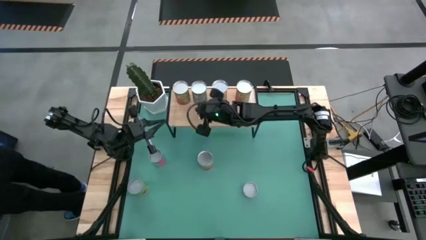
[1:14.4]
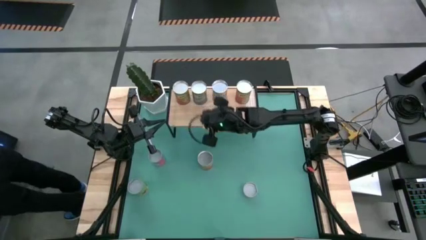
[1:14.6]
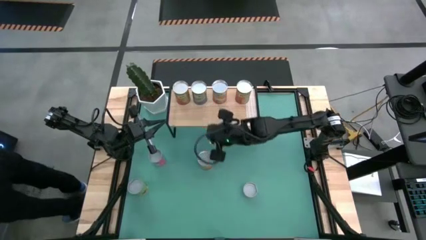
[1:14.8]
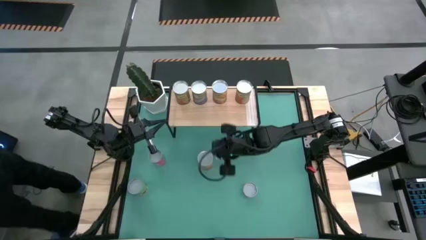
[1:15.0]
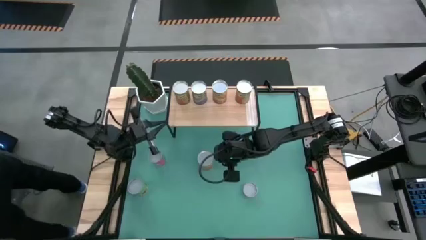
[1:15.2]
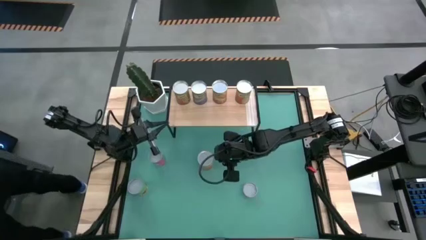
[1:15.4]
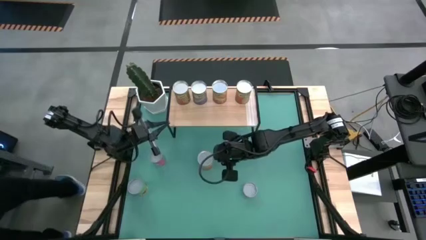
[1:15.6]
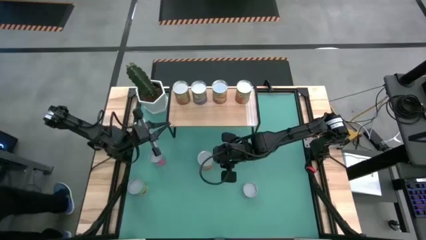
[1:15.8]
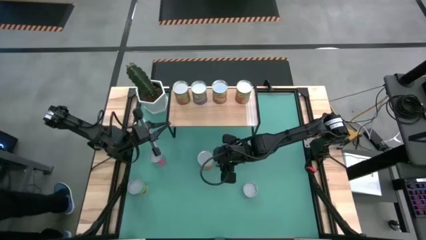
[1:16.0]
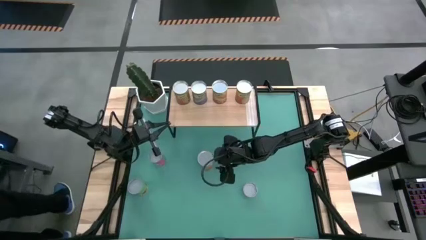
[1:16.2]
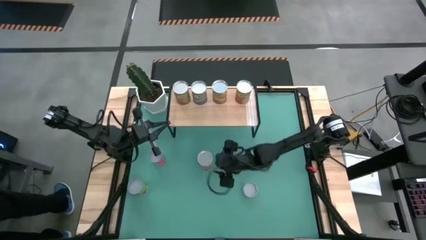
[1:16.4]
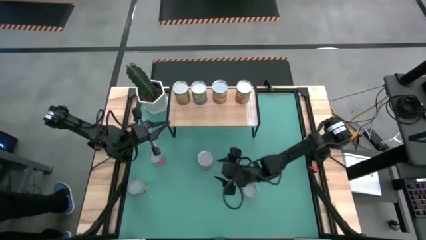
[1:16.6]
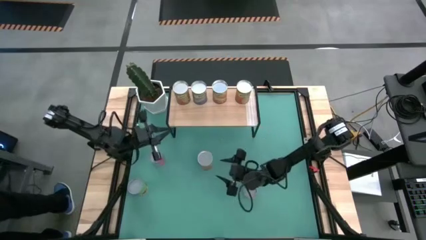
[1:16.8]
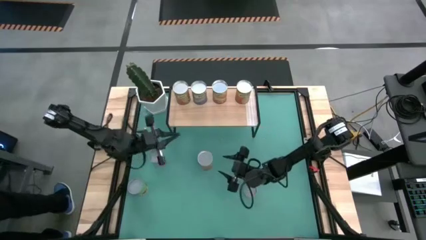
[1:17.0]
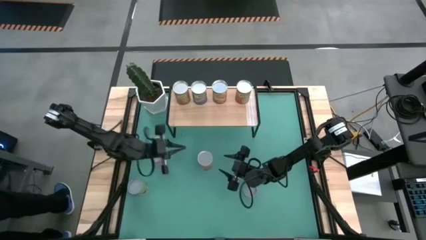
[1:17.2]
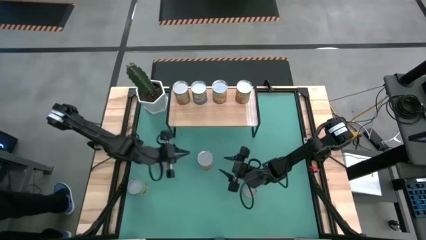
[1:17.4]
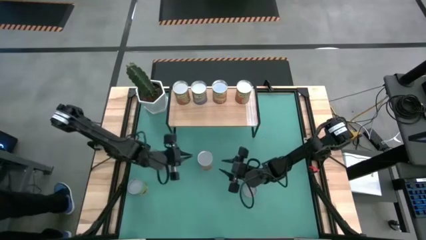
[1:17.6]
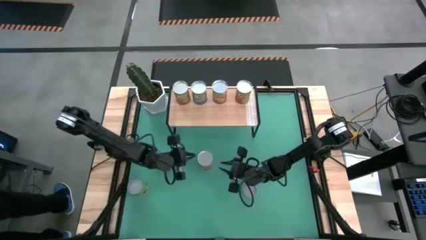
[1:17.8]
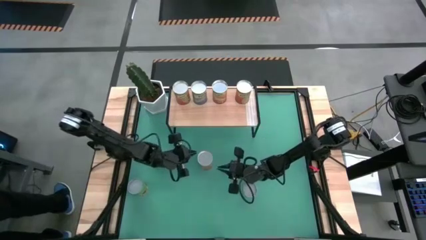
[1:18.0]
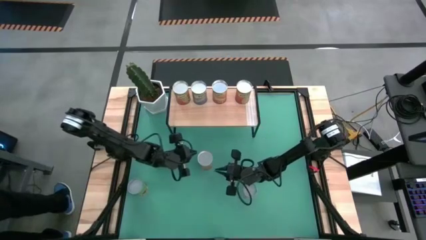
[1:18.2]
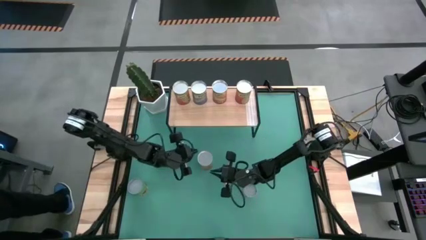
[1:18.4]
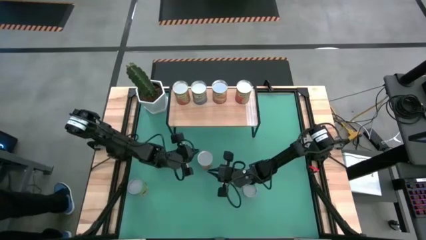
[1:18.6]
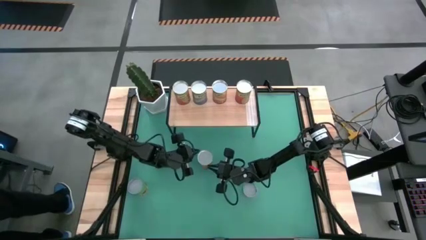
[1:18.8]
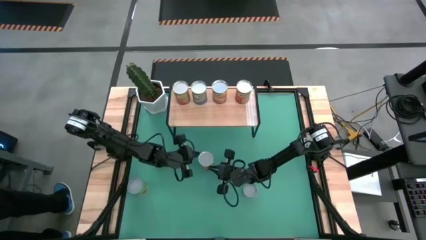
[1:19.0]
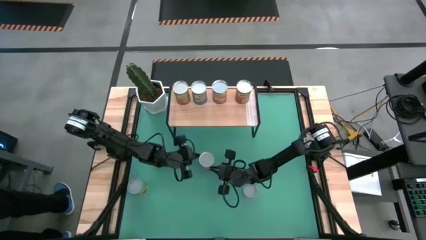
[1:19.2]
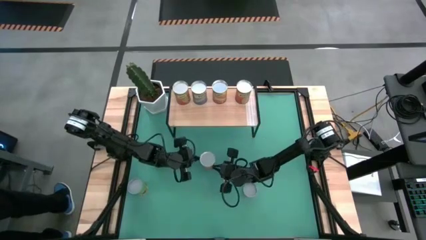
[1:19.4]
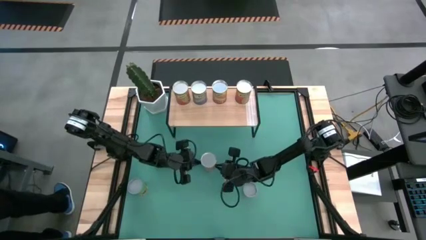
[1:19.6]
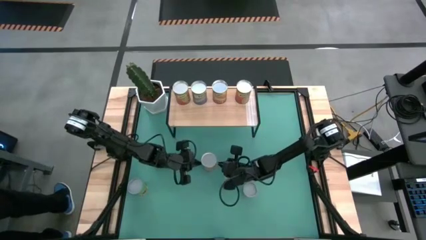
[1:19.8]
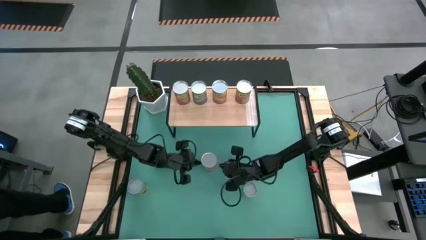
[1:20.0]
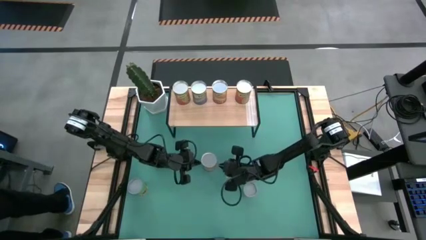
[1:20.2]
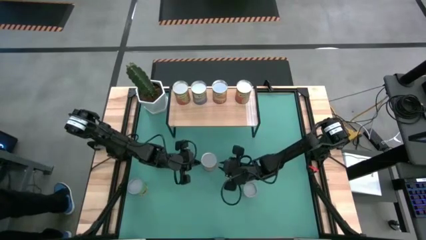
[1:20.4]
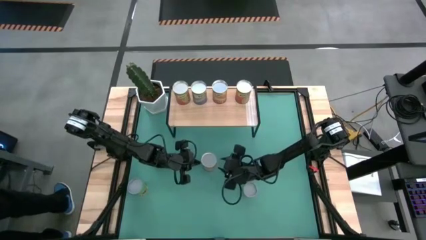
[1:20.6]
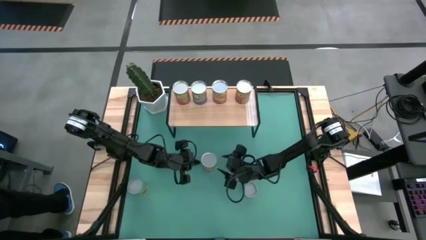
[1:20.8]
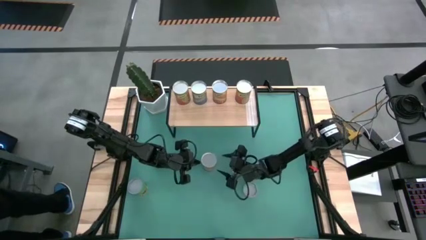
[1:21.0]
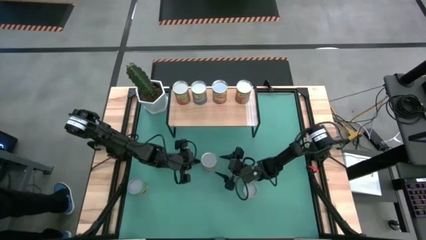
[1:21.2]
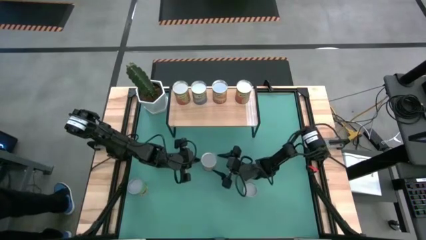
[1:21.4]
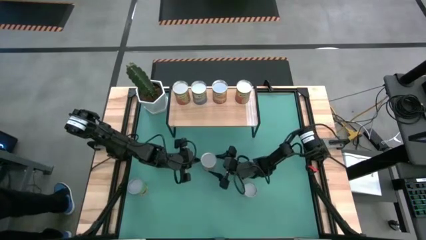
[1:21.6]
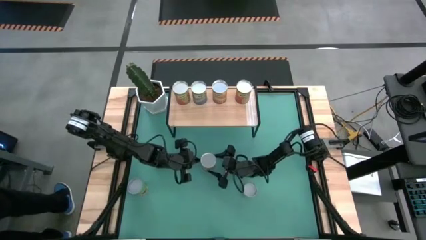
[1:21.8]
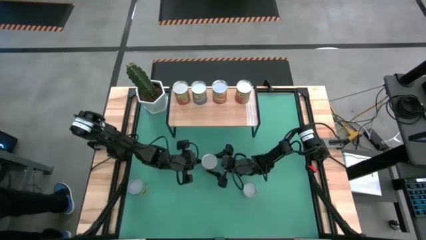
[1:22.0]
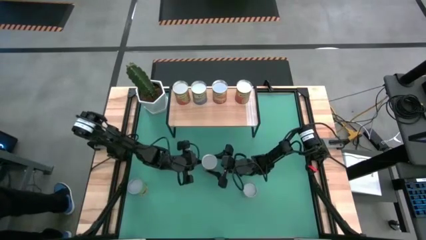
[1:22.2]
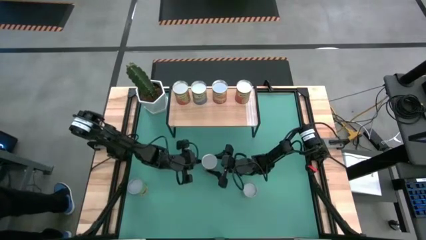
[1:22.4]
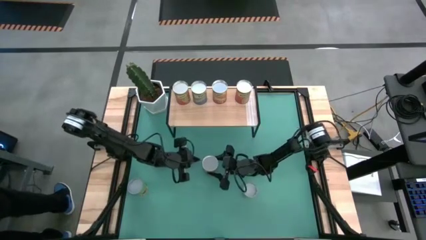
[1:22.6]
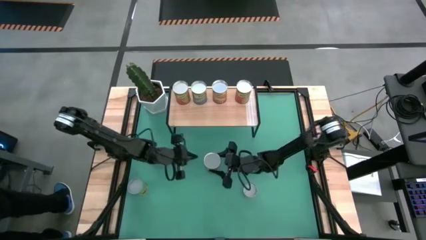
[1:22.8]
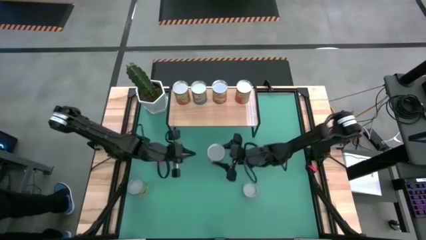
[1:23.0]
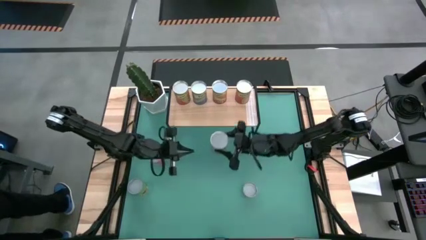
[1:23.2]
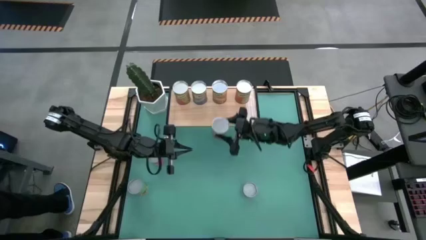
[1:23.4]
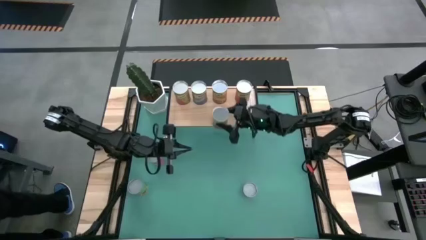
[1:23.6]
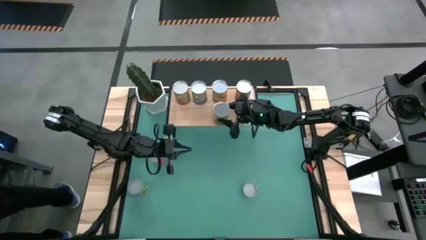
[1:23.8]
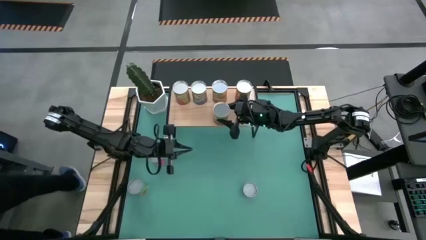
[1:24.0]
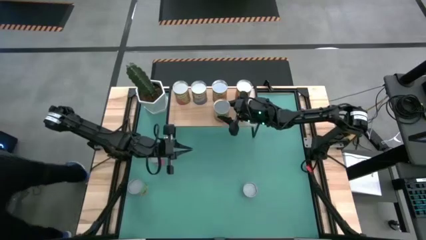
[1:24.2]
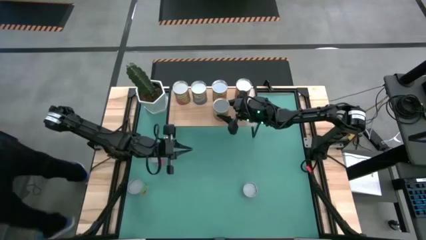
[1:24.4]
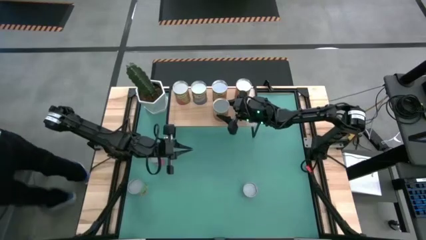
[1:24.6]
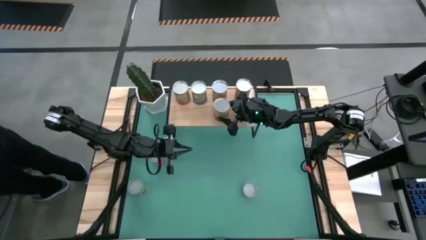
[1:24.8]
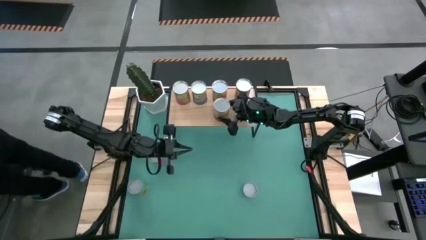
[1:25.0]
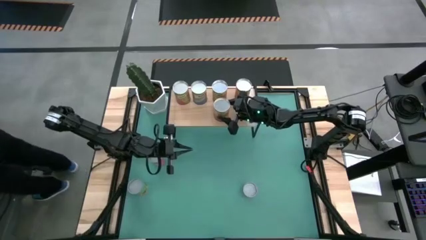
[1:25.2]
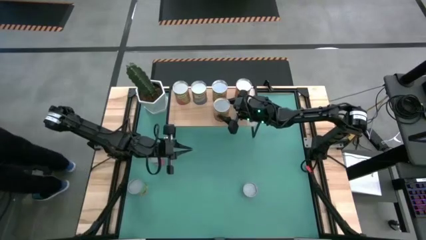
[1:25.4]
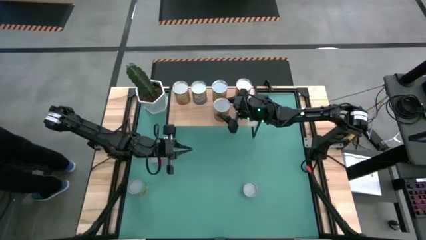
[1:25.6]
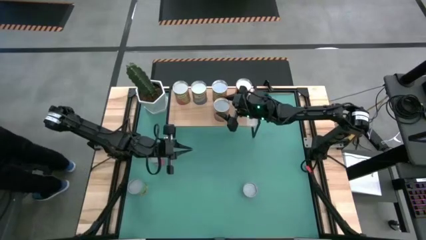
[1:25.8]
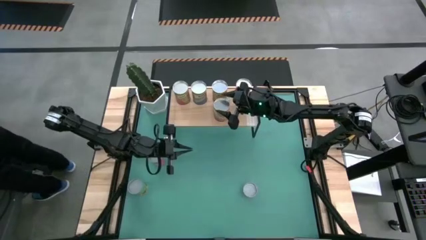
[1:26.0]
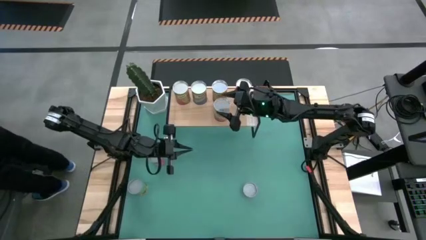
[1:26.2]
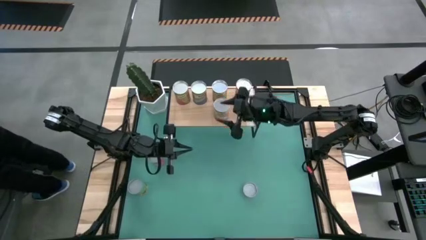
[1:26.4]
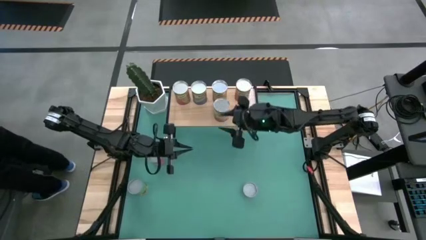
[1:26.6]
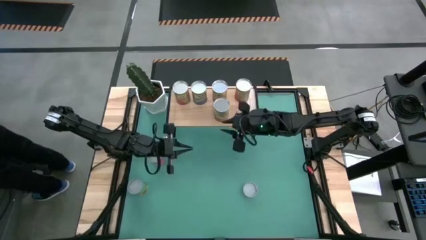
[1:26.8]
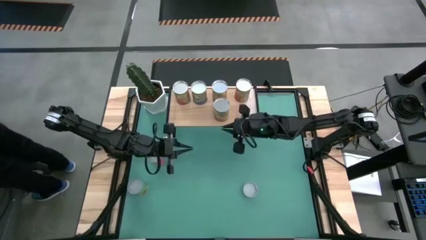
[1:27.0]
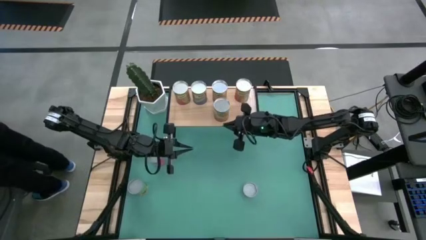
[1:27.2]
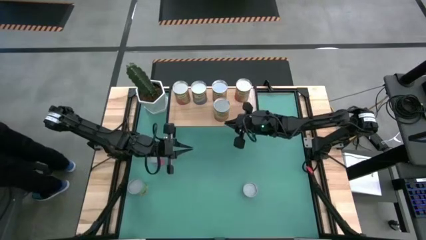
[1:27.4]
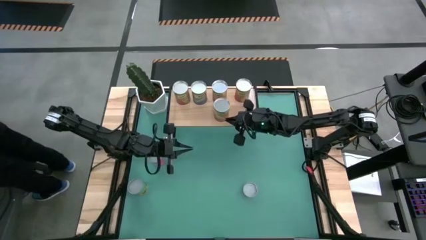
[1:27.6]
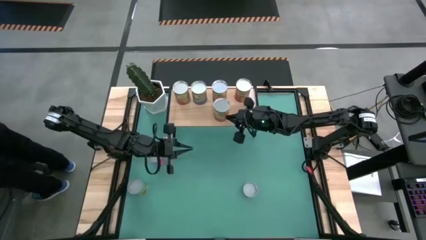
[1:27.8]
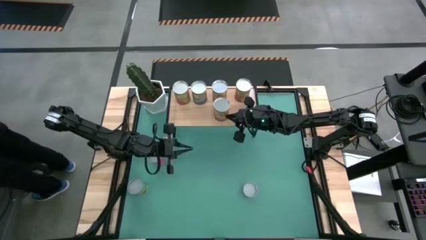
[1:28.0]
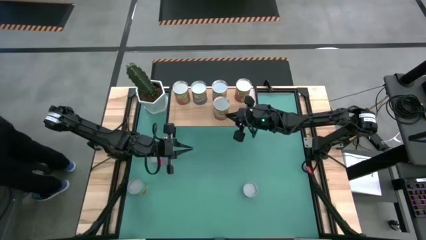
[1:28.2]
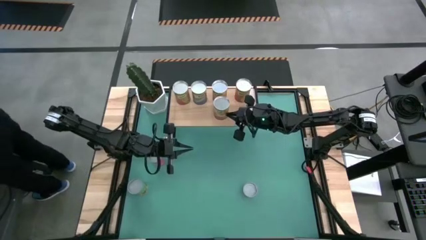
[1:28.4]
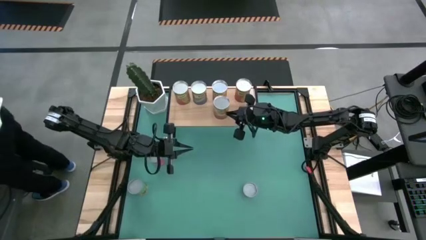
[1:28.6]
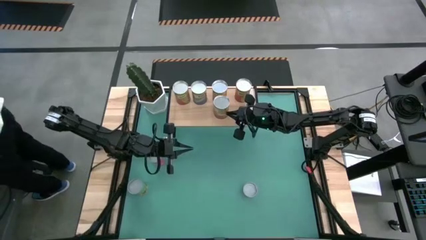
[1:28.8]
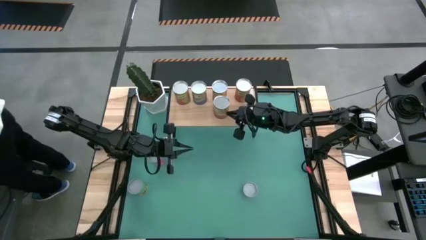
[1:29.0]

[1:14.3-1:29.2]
Task: Pick and place cans onto a shelf
Align the canned corn with the canned corn on the shelf

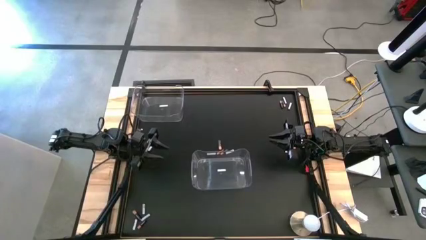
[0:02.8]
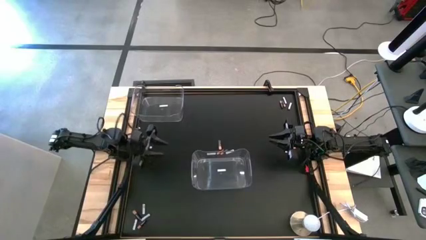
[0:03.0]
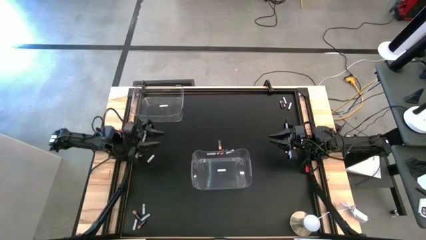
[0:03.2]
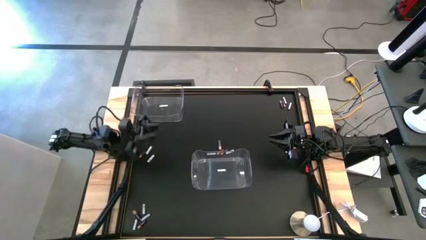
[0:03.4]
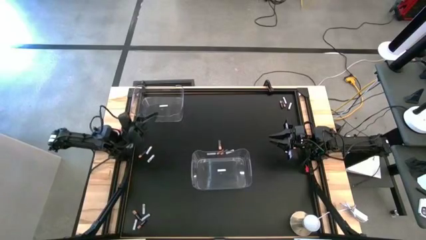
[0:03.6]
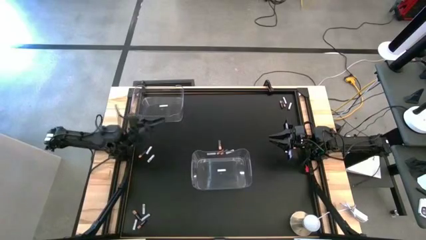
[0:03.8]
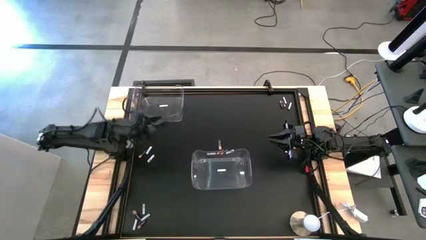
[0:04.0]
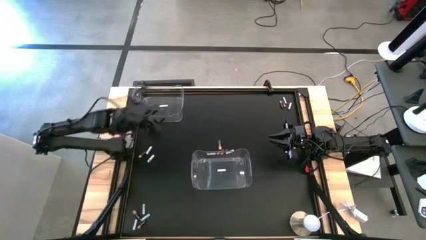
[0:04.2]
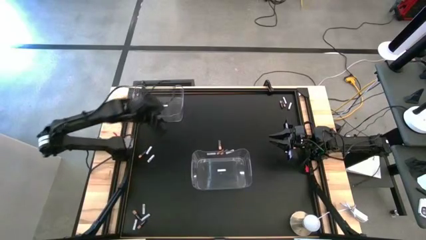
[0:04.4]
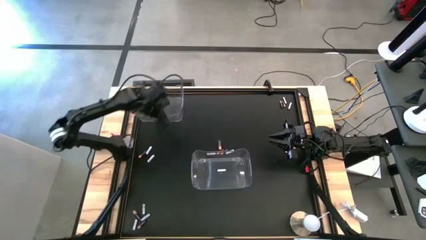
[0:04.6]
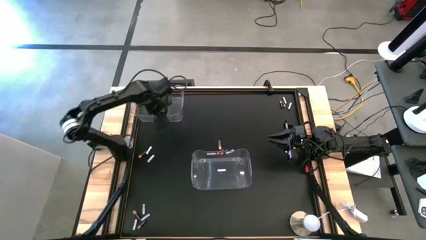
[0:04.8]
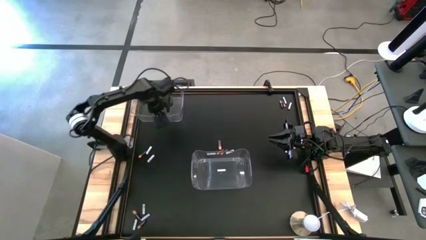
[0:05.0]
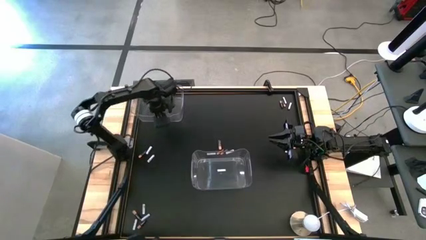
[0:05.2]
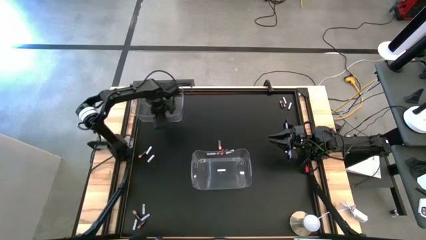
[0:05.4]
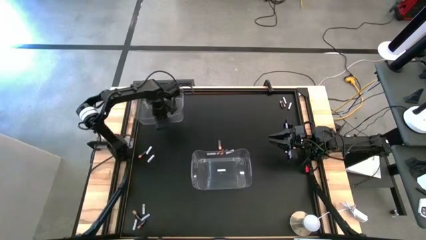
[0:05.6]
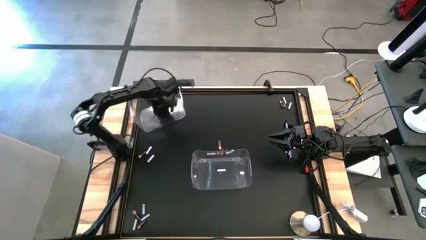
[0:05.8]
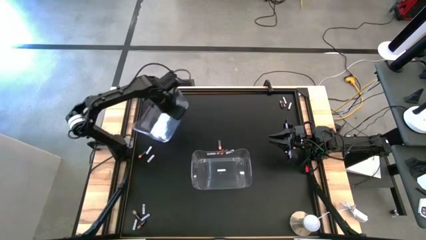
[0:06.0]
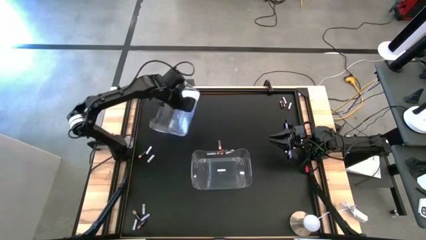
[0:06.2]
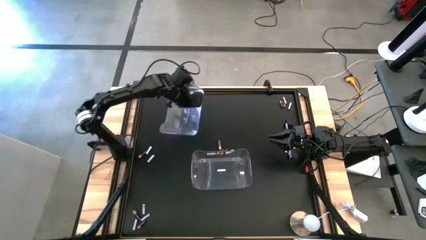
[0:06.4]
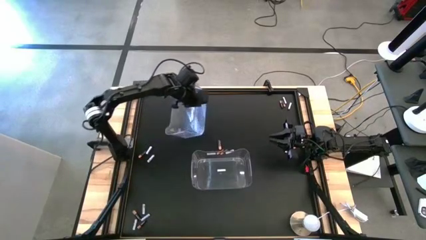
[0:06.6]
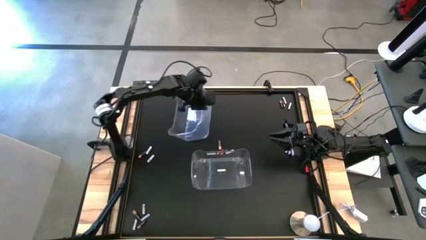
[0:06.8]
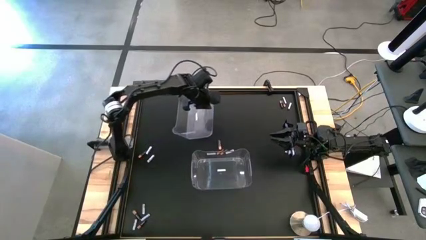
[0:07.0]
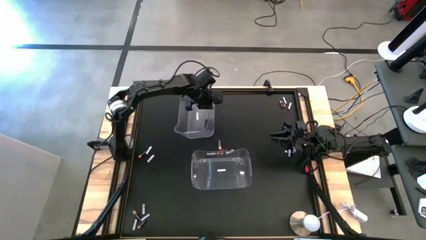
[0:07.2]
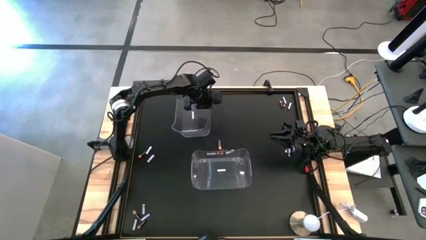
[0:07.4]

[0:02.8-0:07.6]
Task: Sort batteries
Move the top transparent bin to the top left of the table
